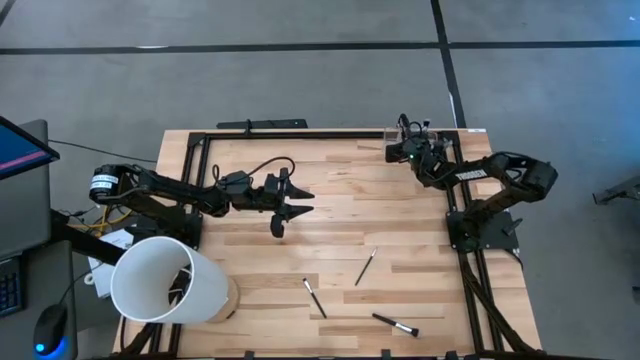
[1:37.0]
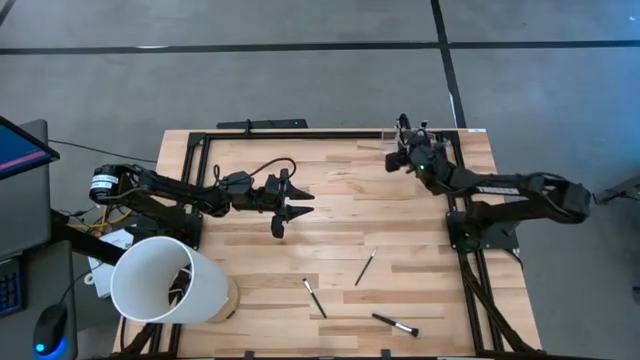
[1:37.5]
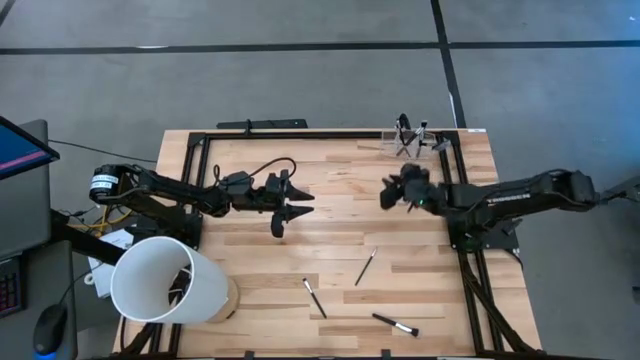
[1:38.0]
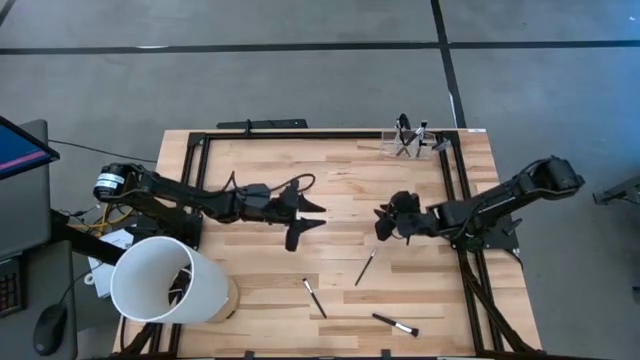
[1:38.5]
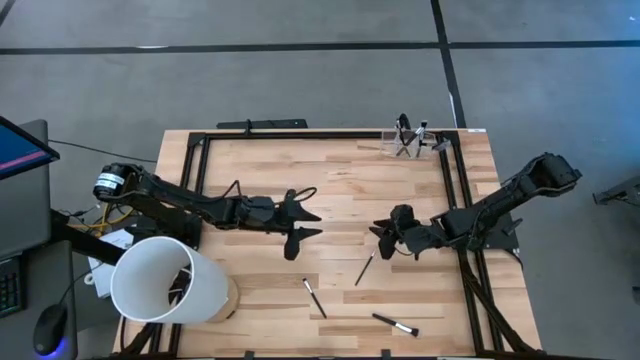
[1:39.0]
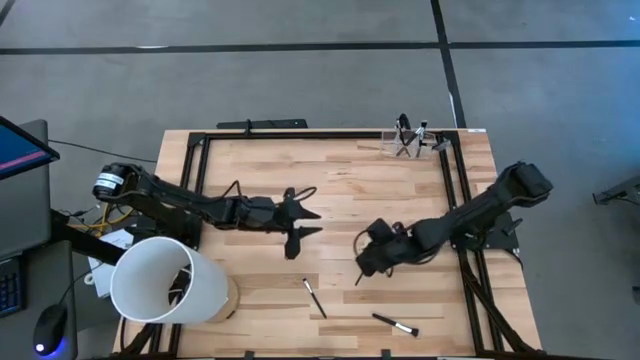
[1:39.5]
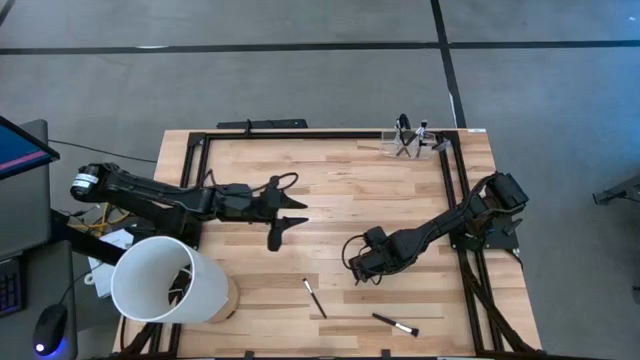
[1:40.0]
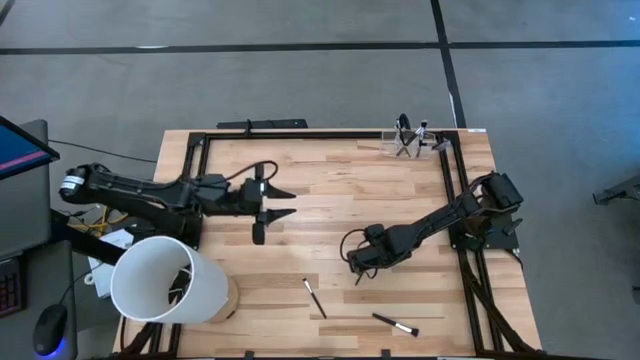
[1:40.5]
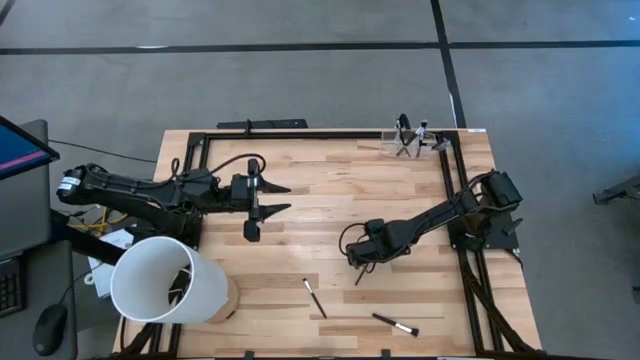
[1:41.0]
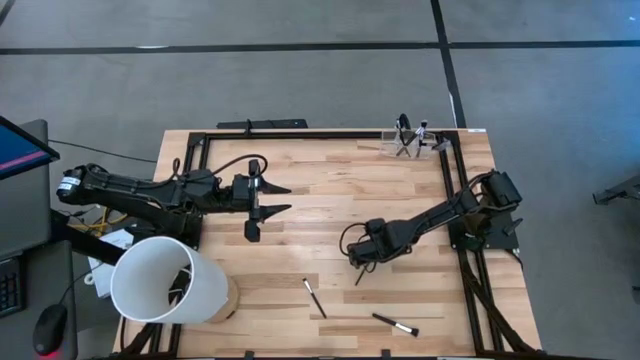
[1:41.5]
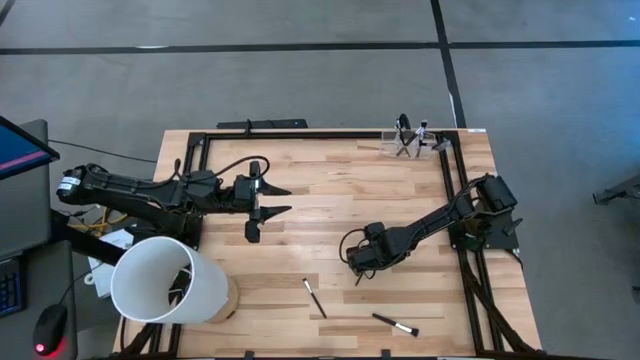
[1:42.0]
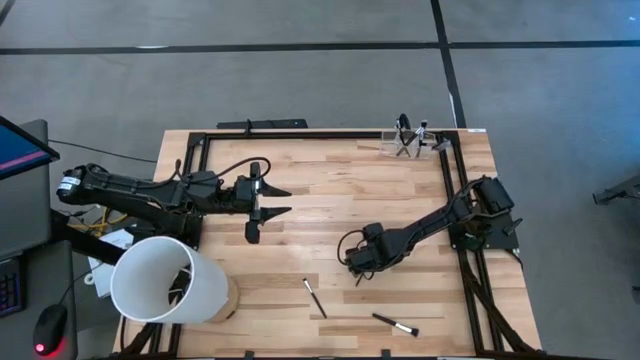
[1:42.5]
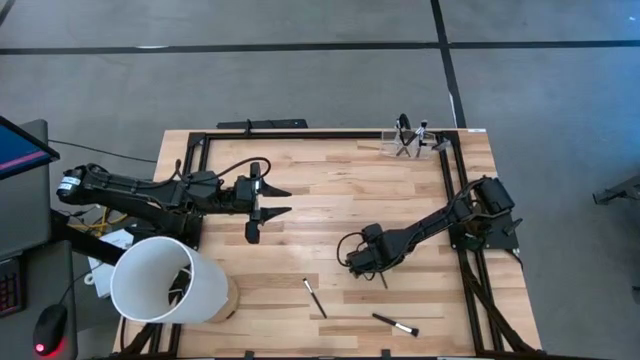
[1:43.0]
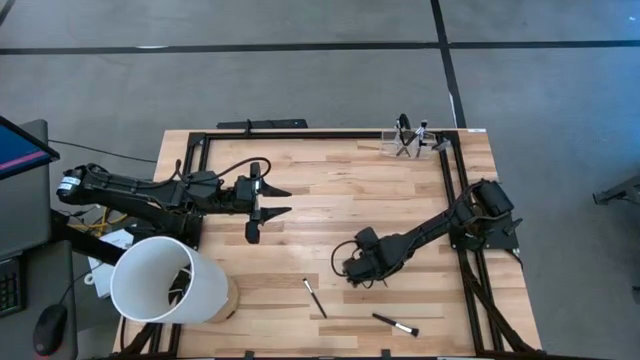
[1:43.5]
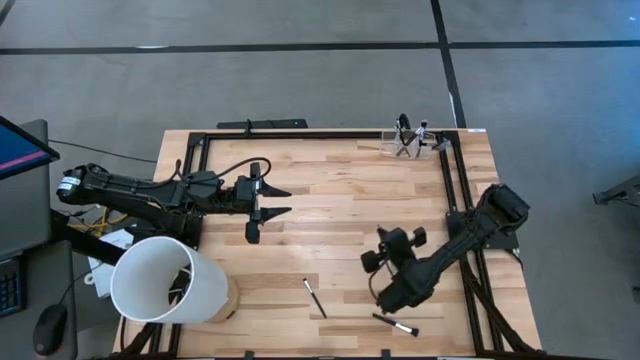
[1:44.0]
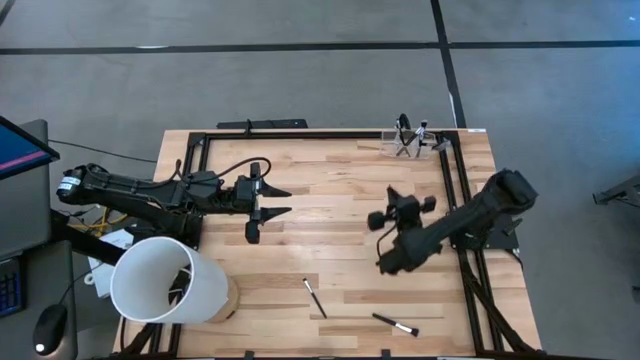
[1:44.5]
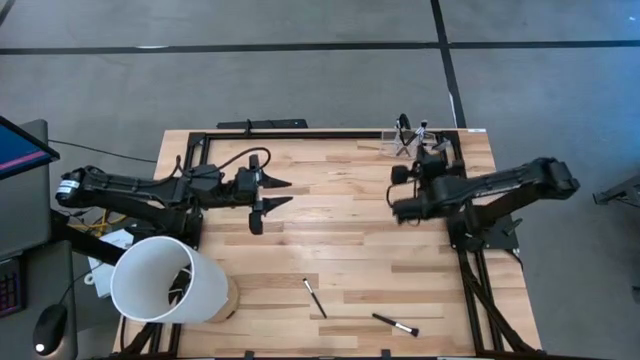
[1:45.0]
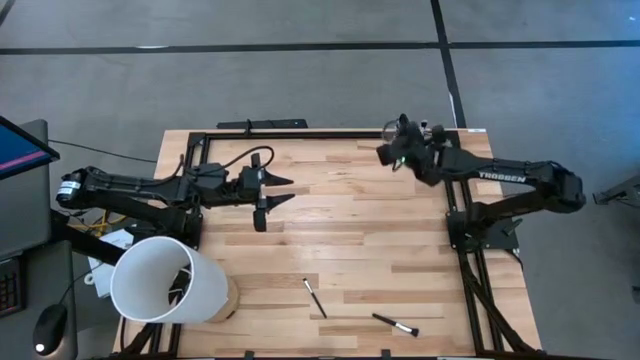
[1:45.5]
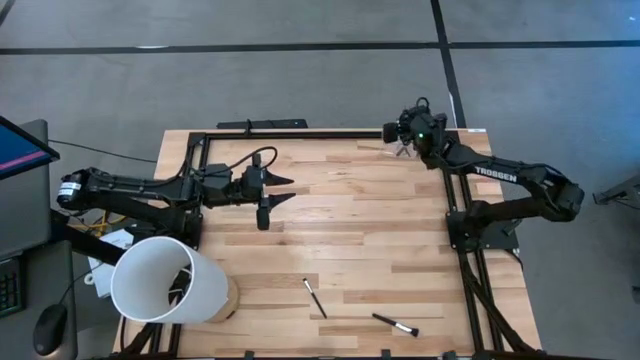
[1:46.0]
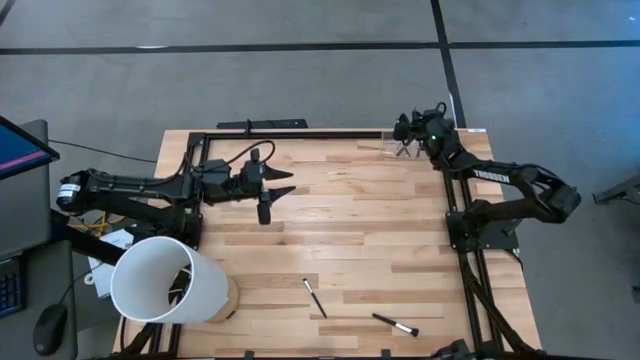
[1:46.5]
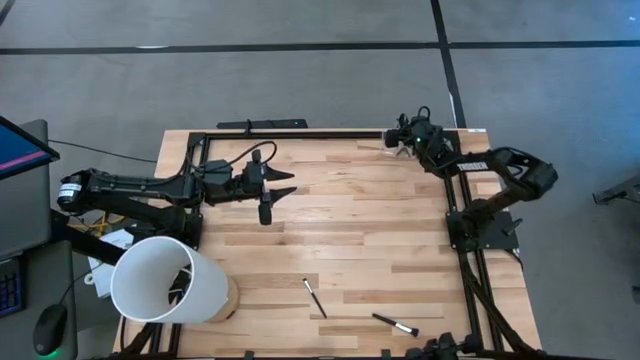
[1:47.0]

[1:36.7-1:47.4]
Task: Put items in baskets/containers
Put the liner brush into the middle section of the transparent organizer

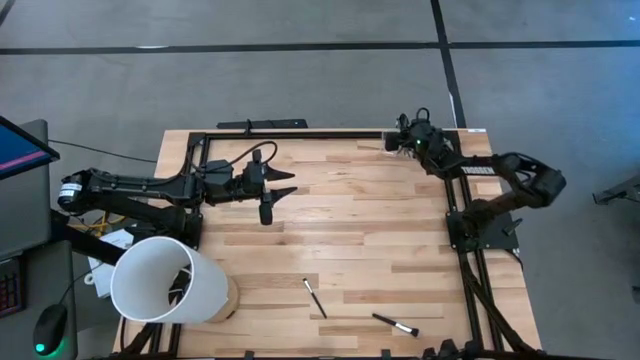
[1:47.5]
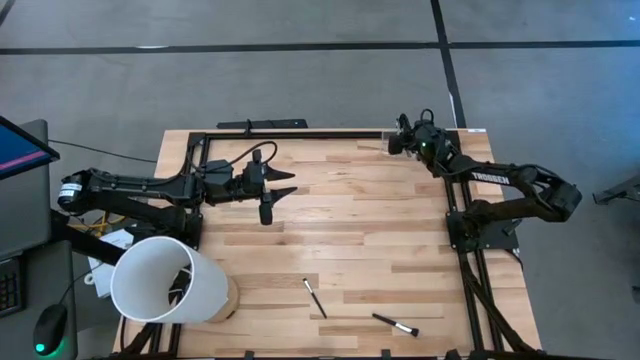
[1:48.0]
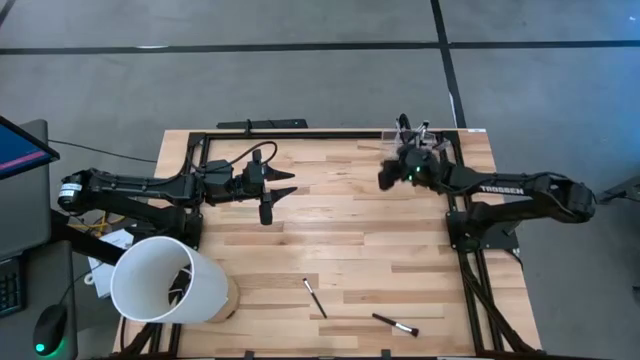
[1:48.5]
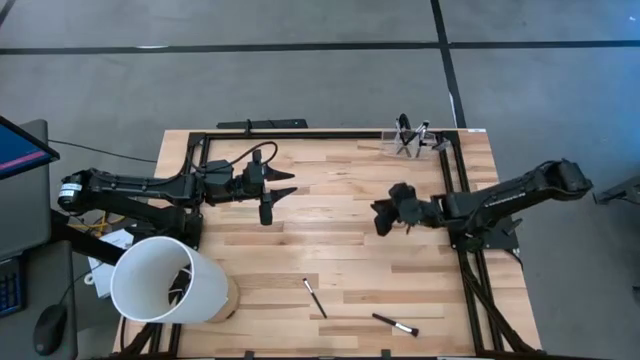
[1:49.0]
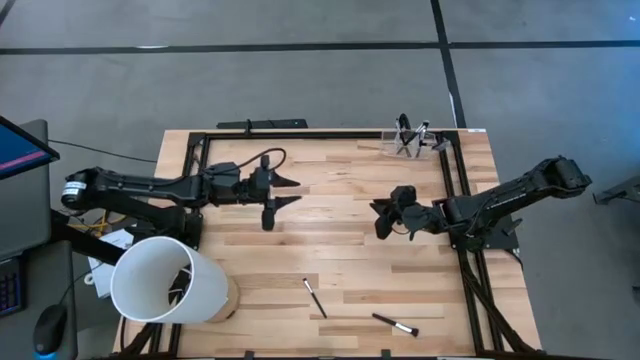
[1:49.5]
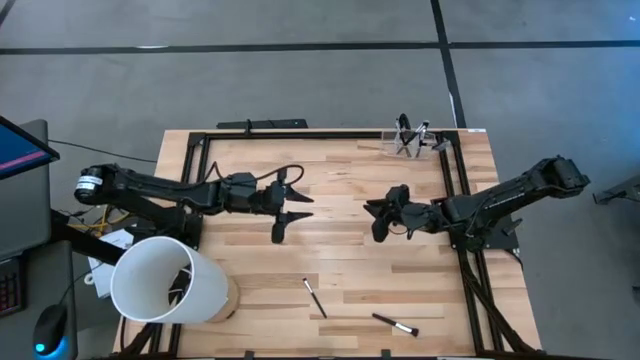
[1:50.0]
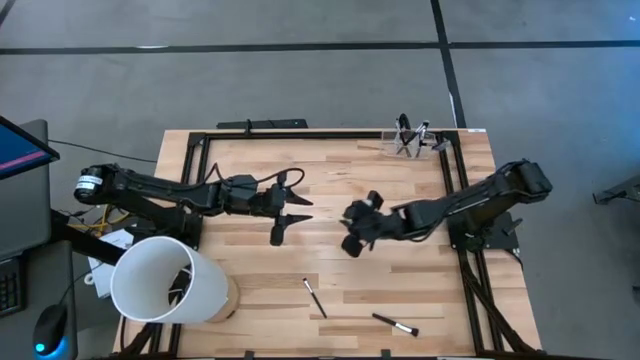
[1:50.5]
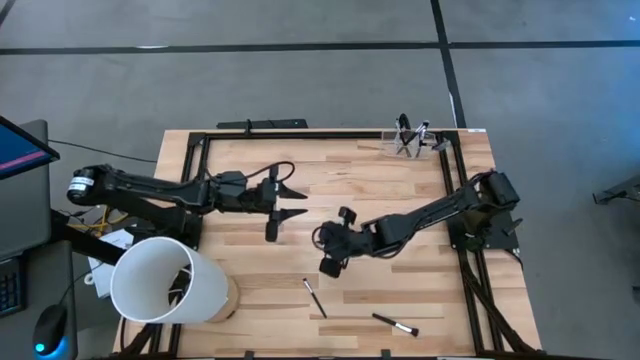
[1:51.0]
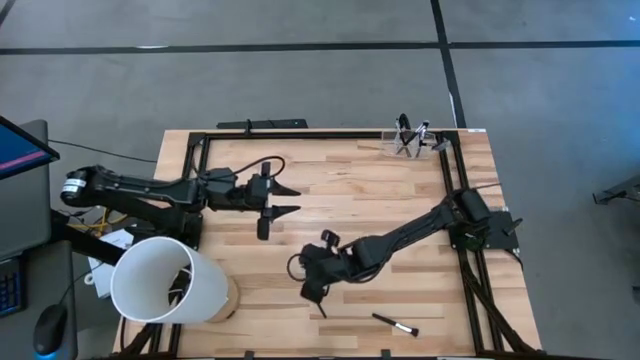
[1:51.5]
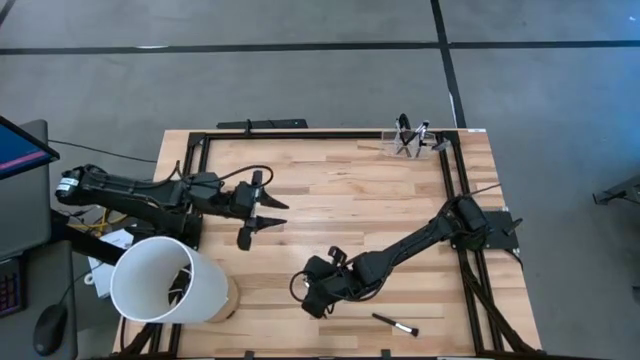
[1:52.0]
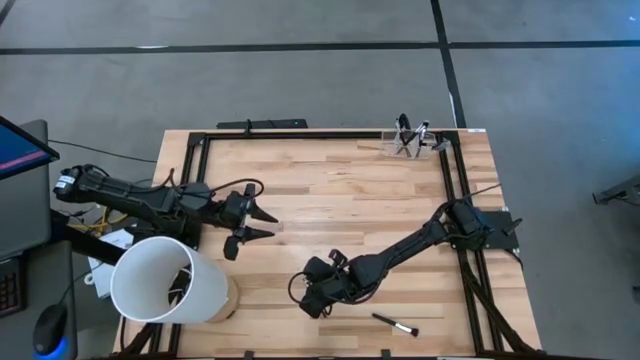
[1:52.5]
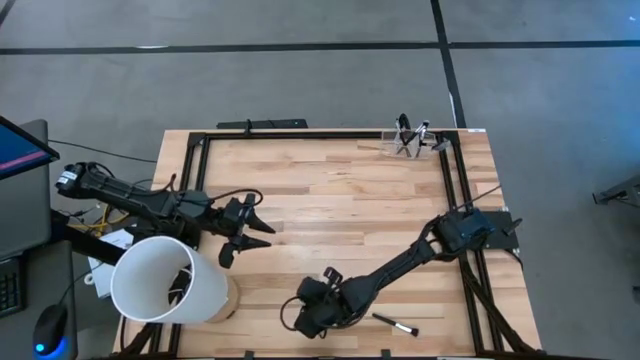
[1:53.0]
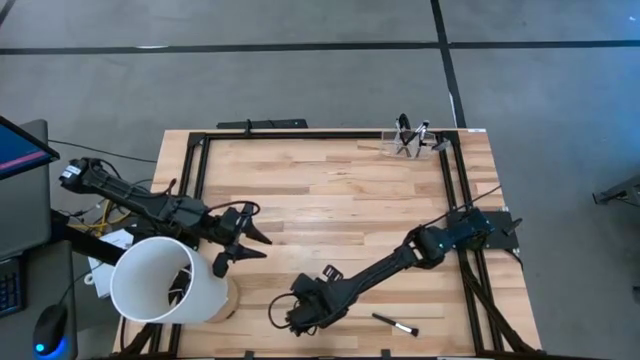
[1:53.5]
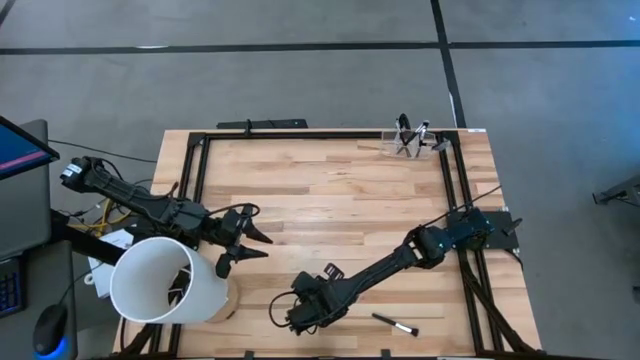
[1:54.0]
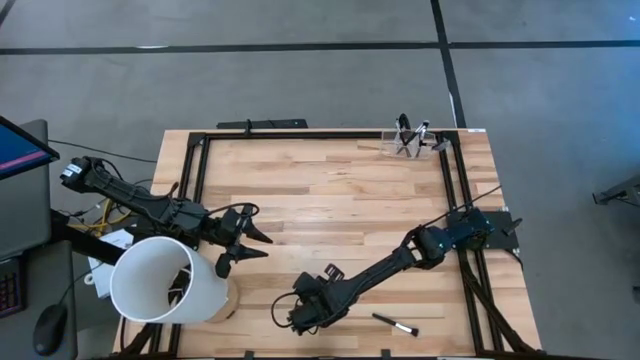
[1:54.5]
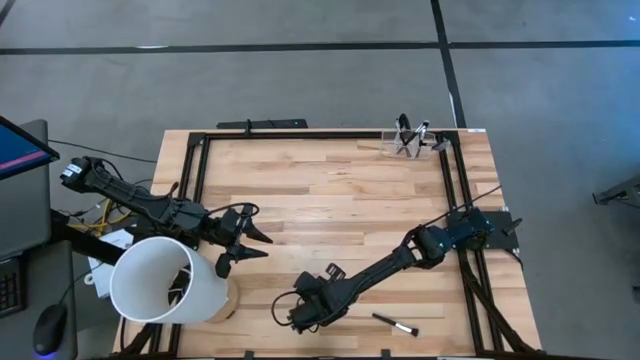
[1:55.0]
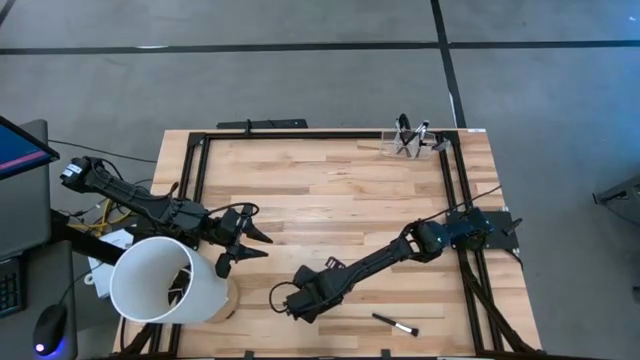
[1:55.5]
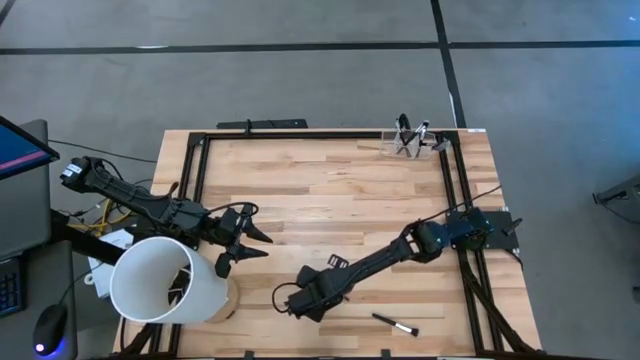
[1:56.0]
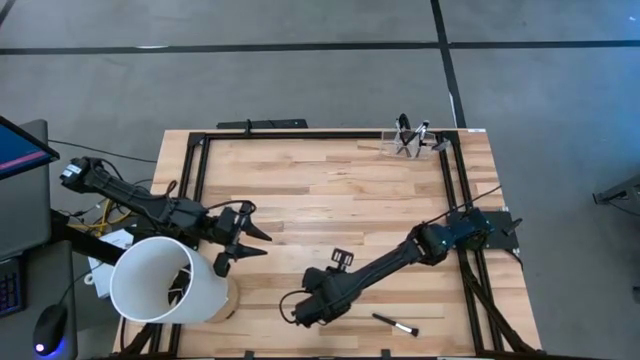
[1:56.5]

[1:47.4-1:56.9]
Put the black eyeshadow brush into the middle section of the transparent organizer
